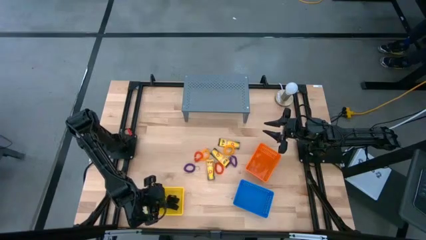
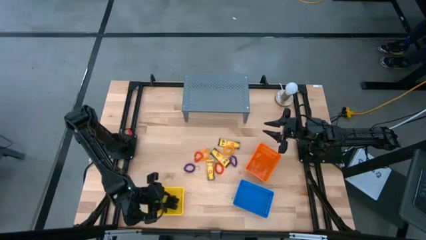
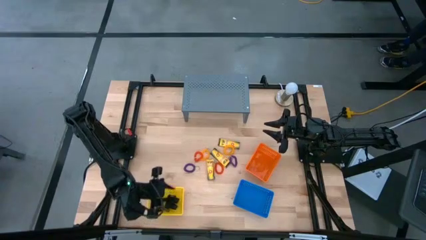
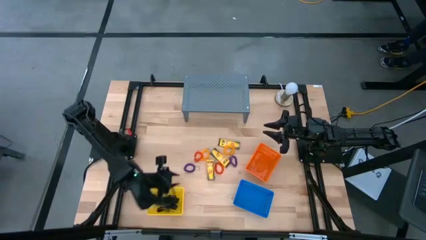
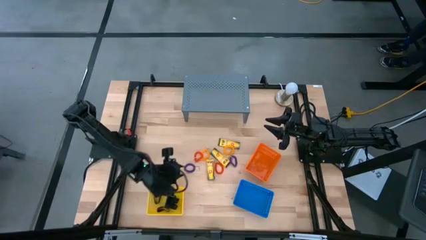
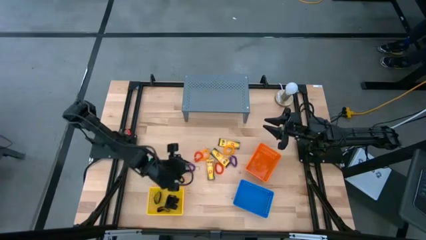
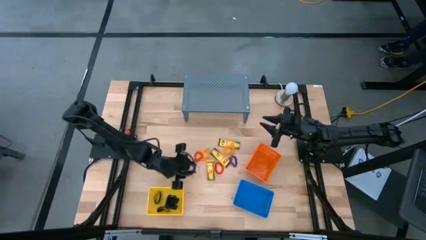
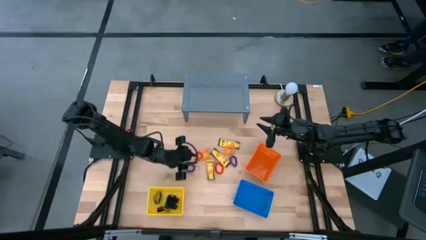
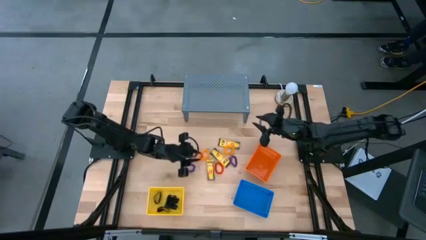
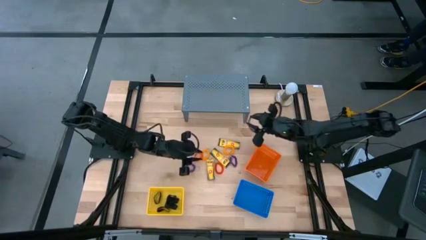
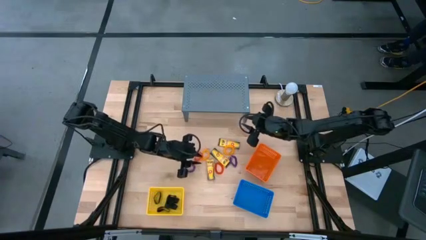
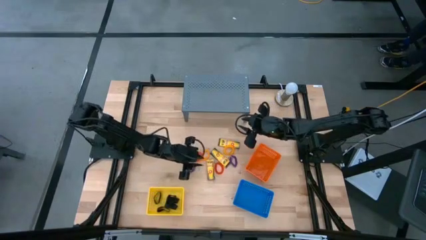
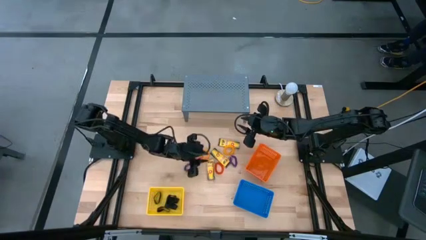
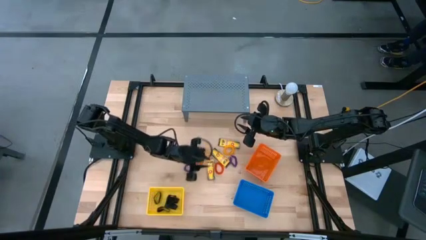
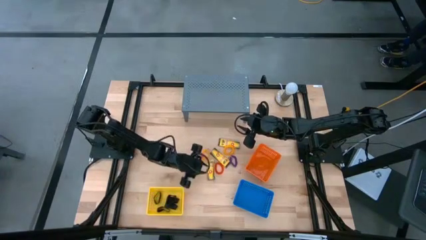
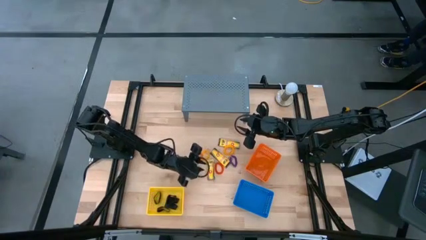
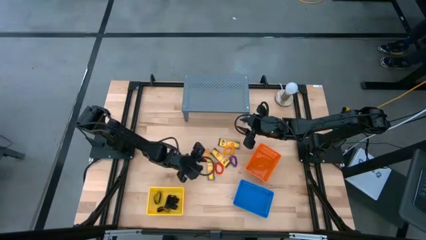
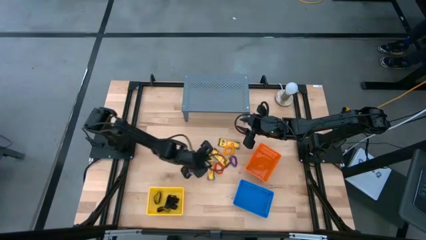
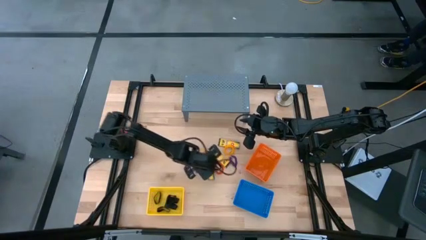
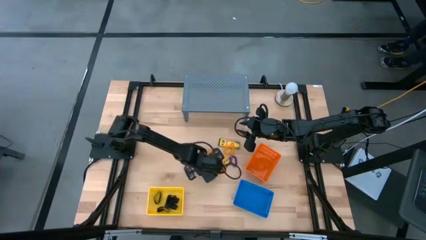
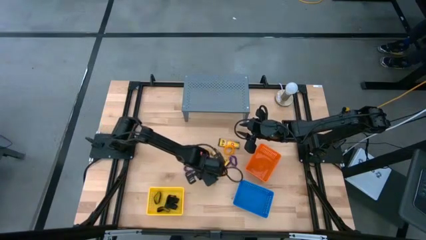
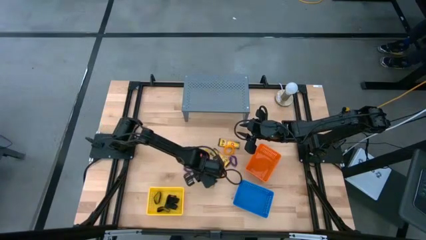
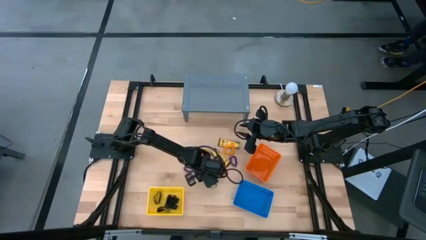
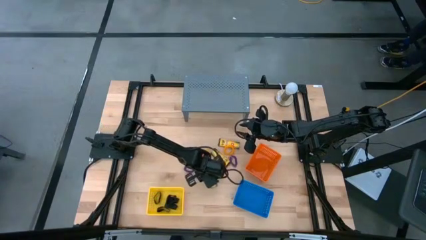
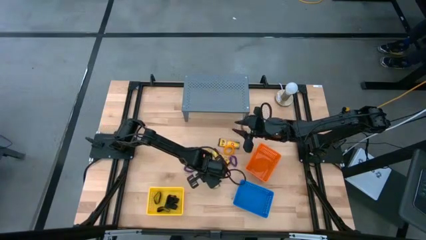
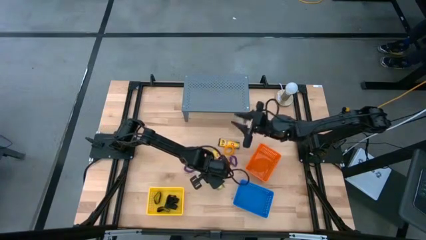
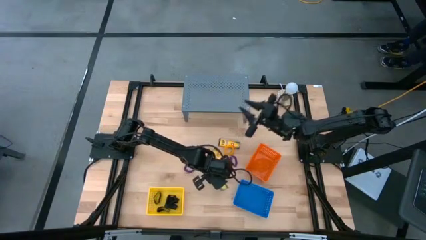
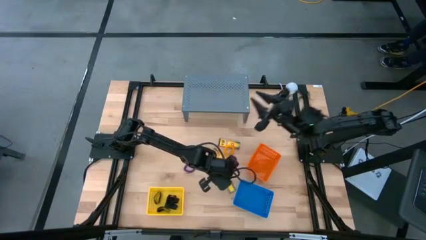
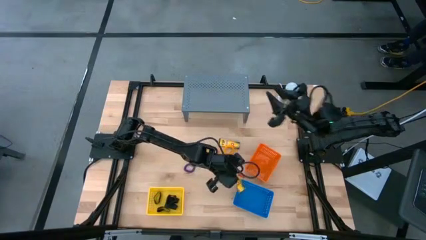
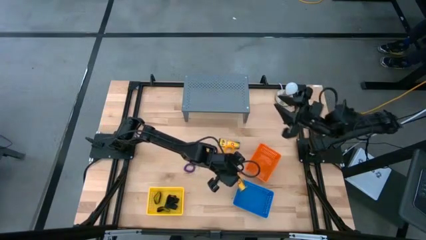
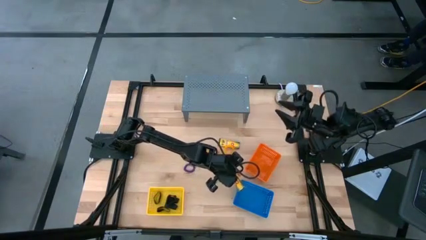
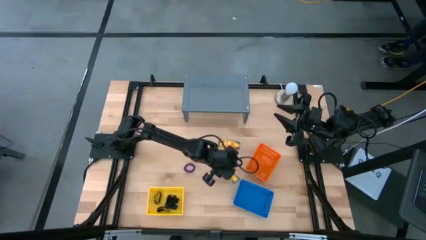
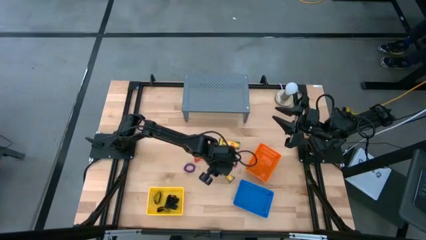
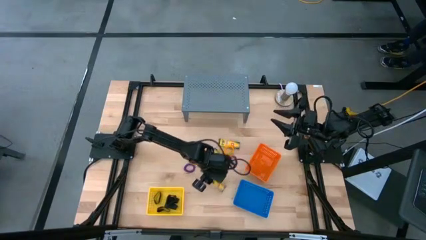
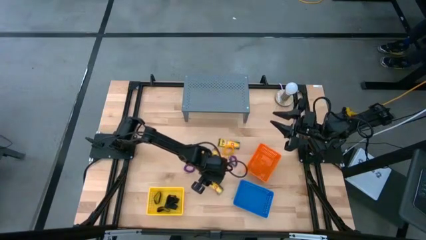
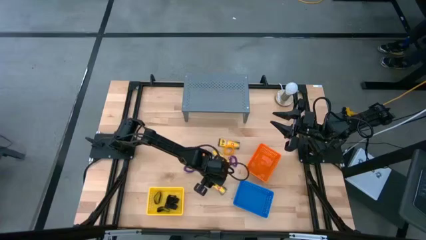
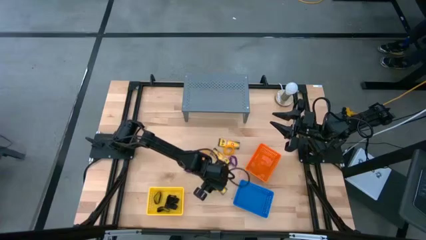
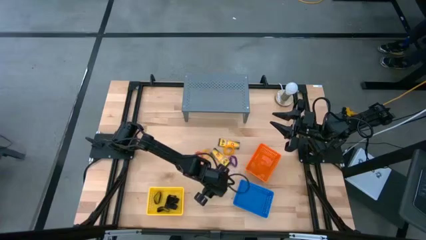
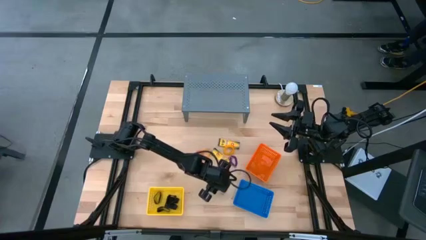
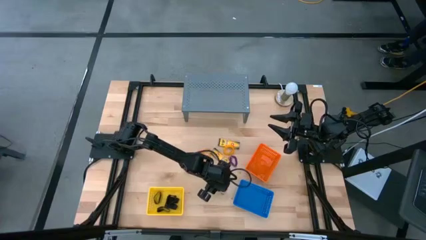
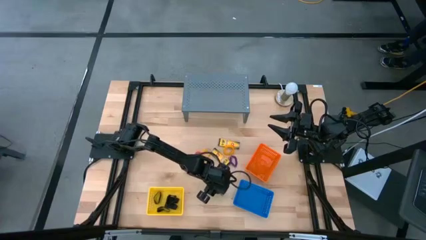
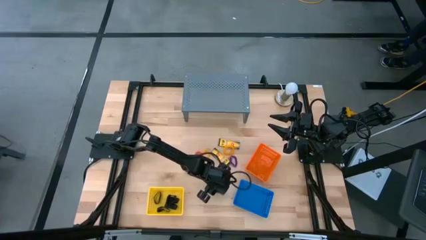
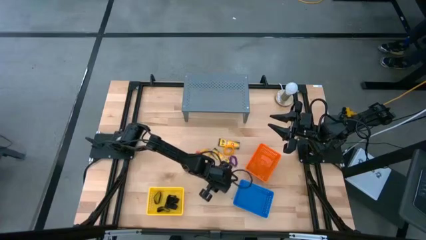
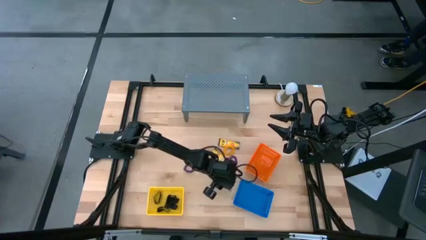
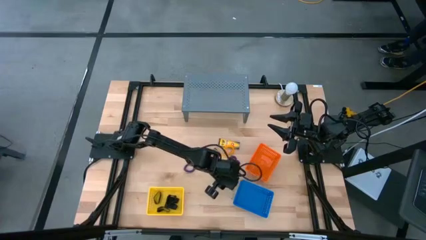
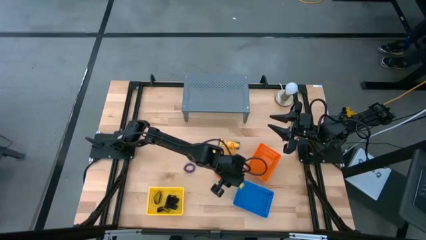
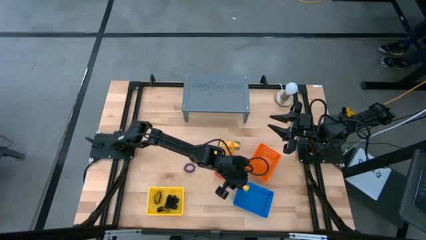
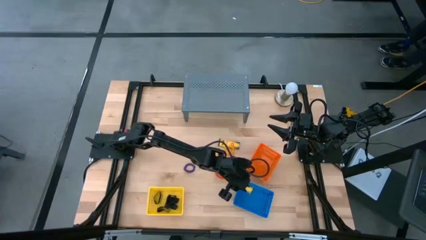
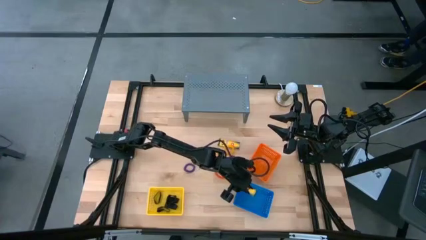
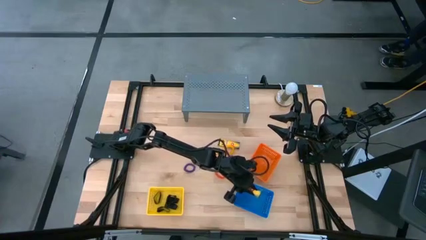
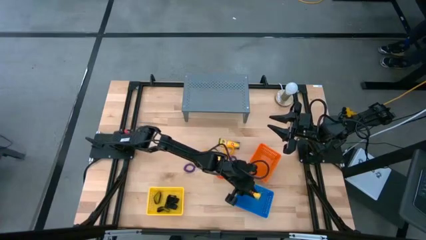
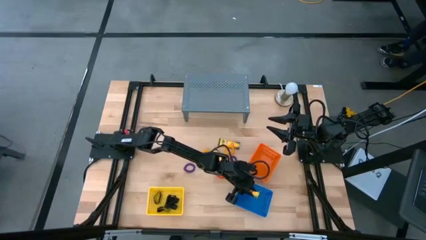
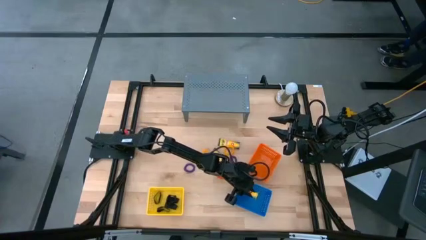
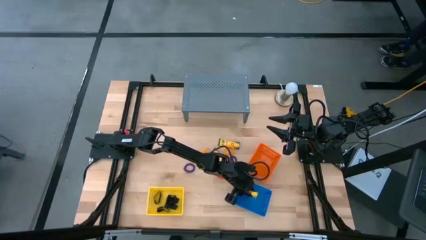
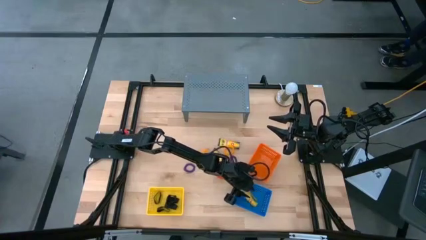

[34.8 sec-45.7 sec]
Task: Pick & Place Office Desk Supplies
Put the crayon into the blue basket

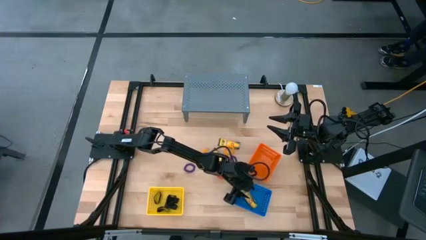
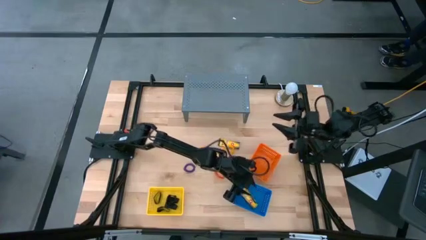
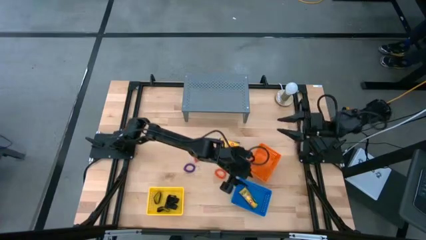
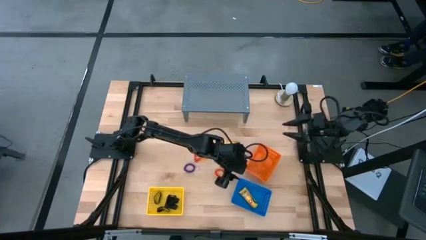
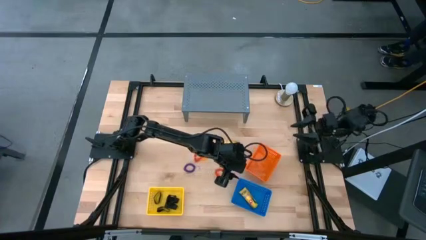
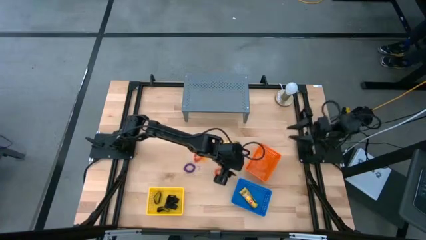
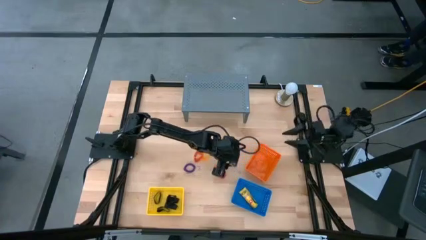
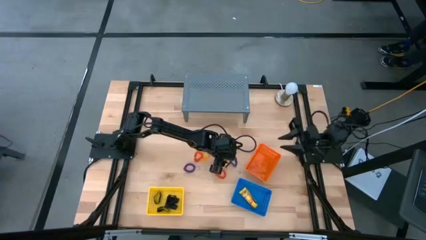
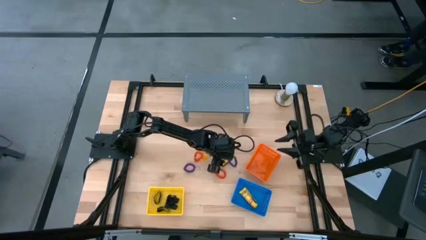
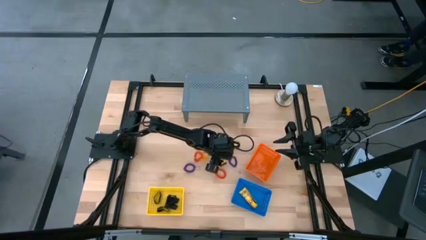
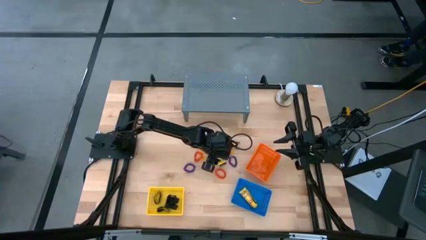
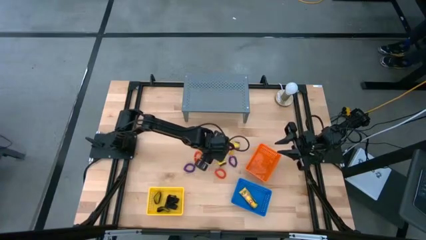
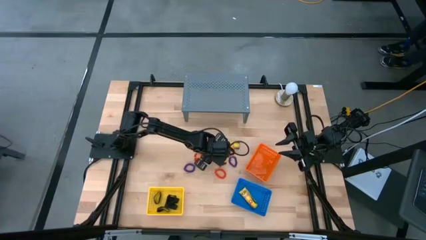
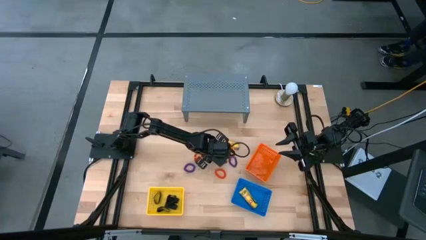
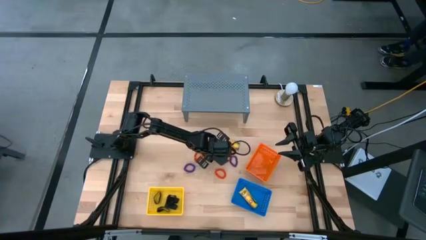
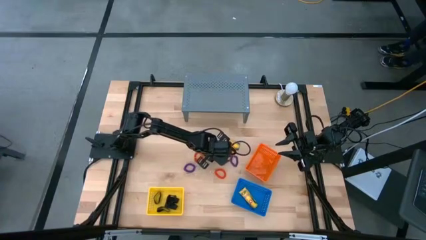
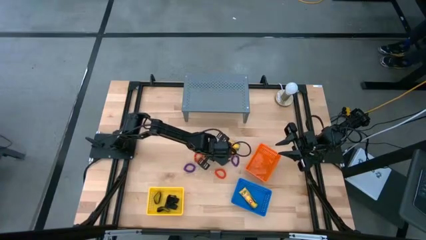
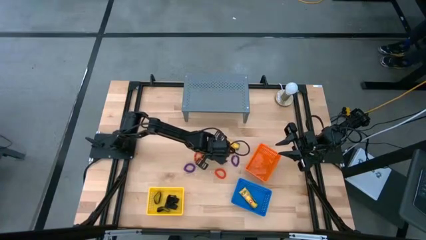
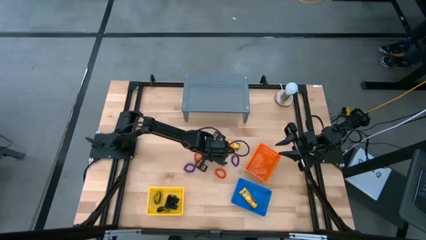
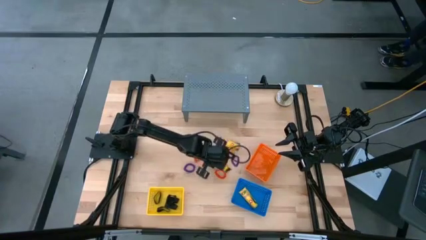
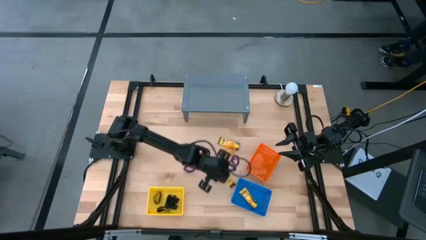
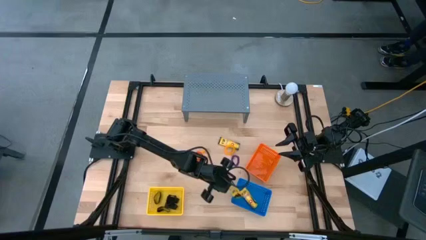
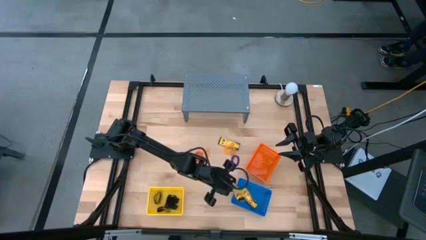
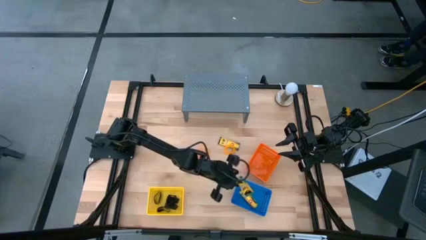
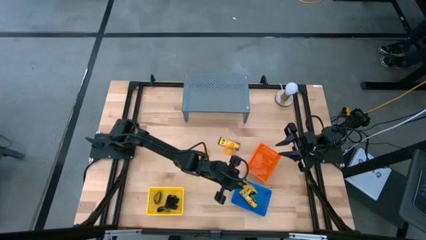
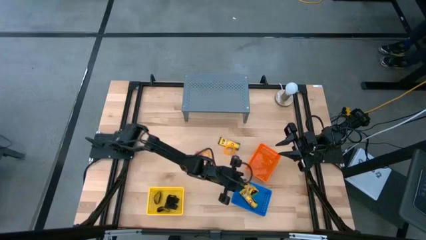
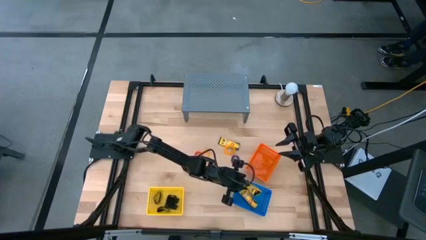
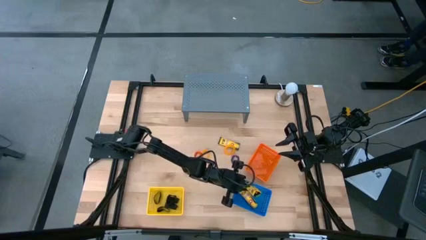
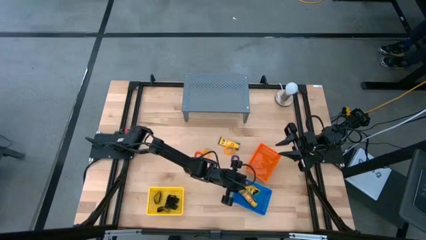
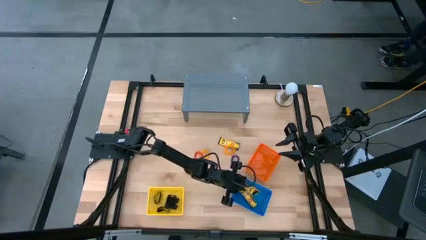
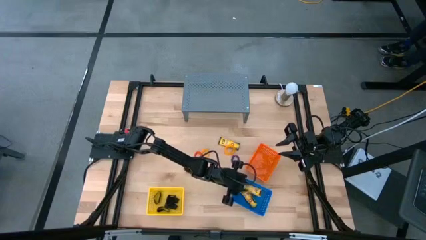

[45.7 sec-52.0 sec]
Put the crayon into the blue basket
